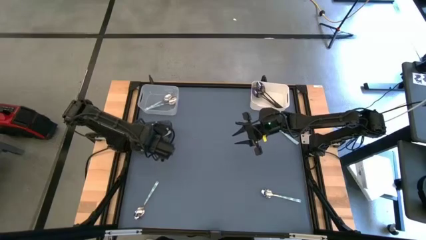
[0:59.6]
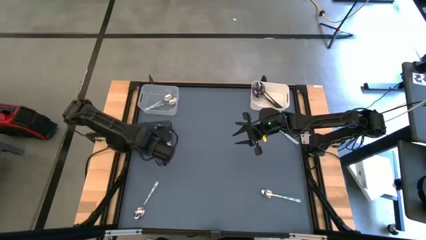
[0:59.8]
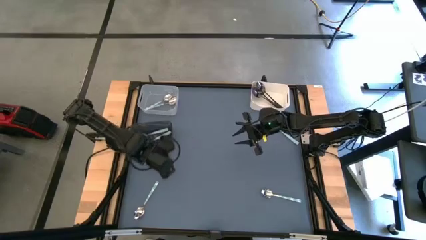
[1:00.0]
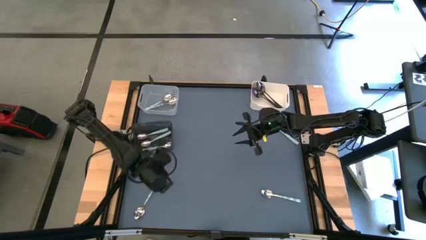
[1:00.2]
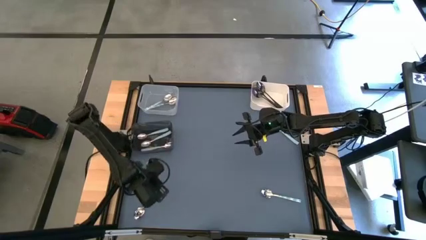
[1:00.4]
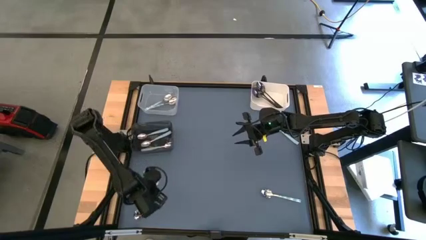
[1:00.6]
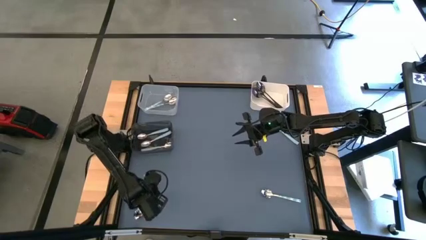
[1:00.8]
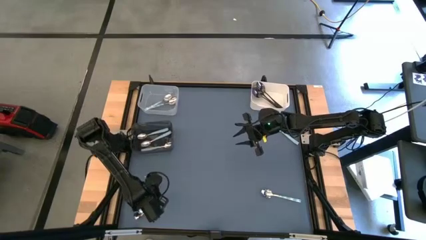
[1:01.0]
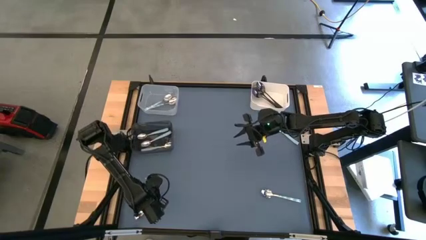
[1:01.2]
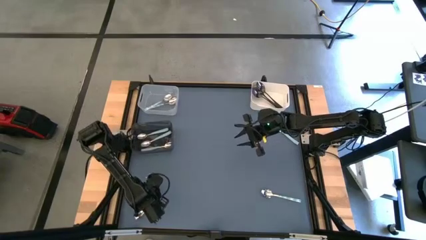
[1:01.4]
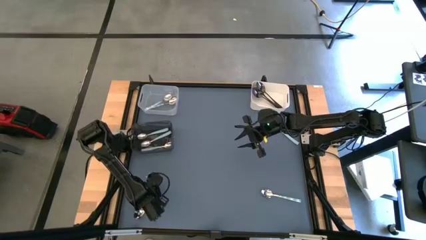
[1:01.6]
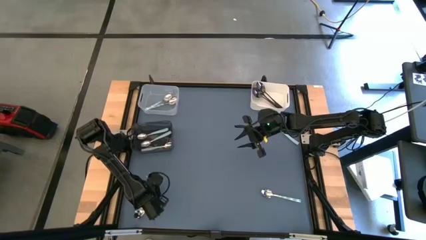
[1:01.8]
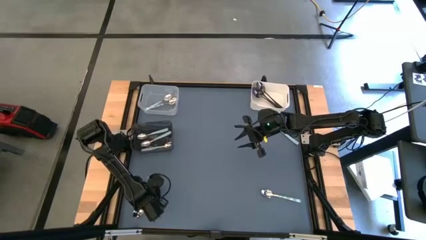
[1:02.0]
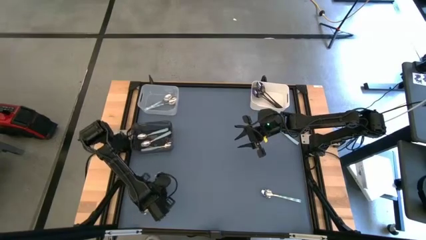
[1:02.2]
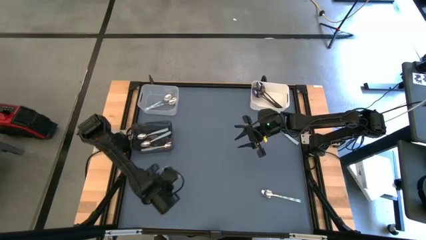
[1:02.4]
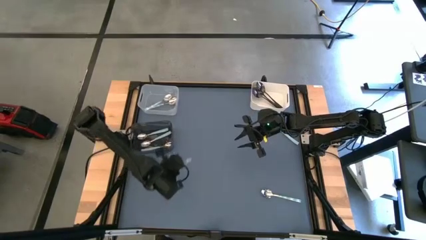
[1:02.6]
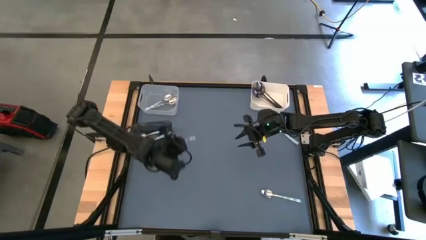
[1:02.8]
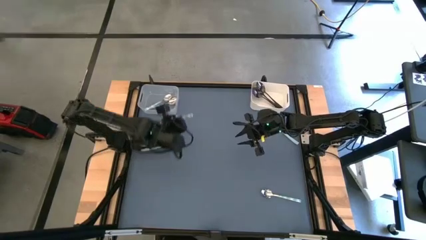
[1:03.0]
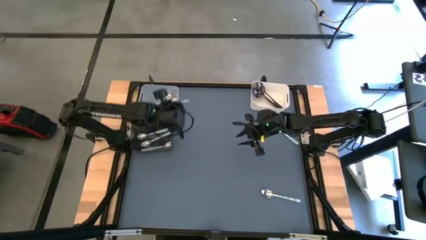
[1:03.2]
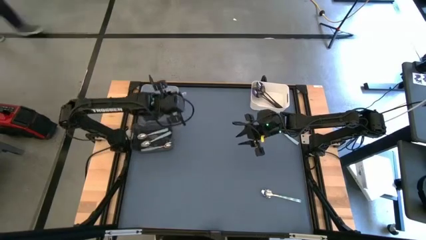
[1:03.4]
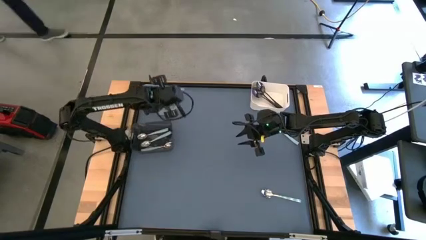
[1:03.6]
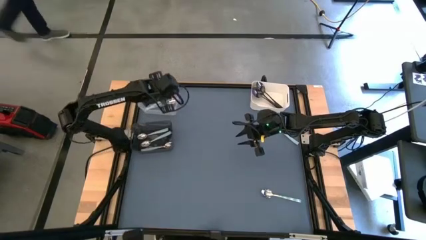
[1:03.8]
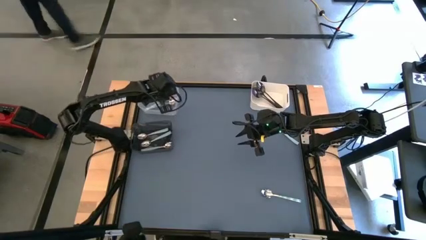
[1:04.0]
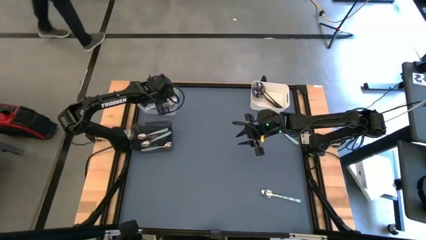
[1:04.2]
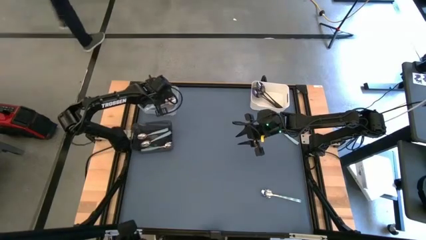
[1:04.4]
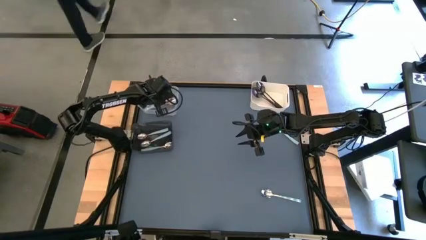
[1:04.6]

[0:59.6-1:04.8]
Task: Sort silverware by color (type)
Put the green spoon into the transparent bin

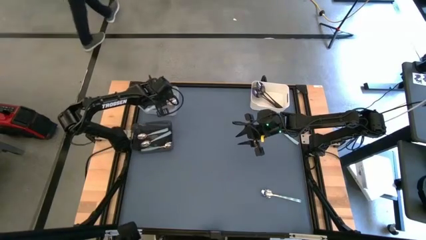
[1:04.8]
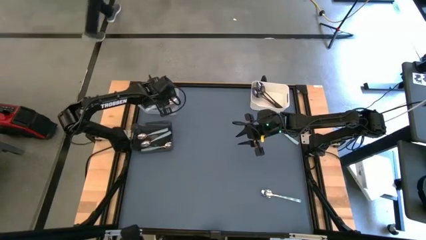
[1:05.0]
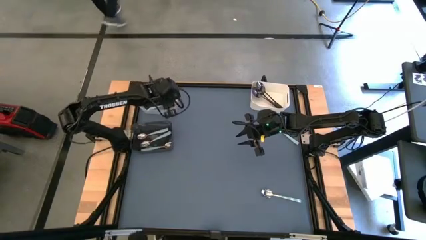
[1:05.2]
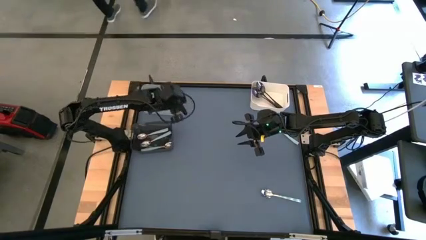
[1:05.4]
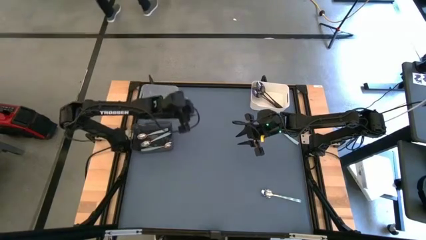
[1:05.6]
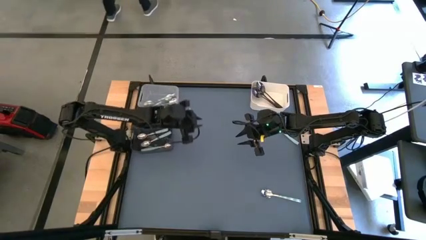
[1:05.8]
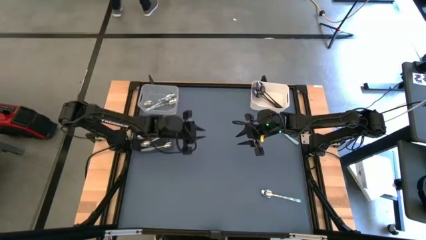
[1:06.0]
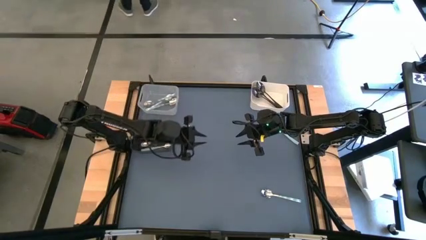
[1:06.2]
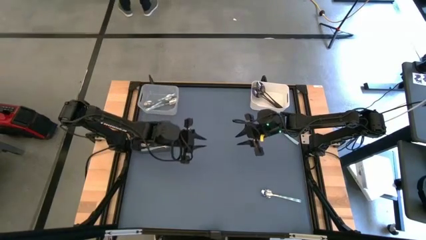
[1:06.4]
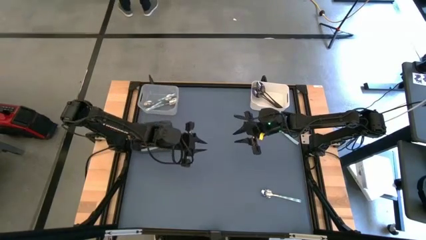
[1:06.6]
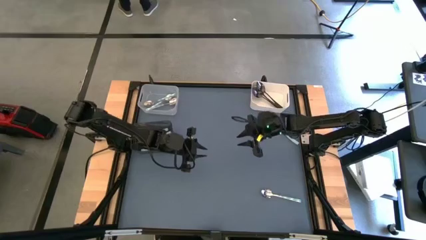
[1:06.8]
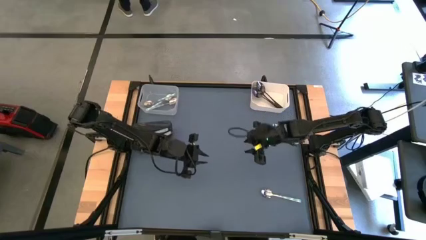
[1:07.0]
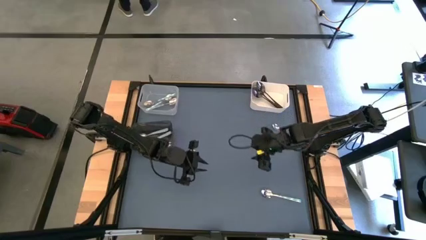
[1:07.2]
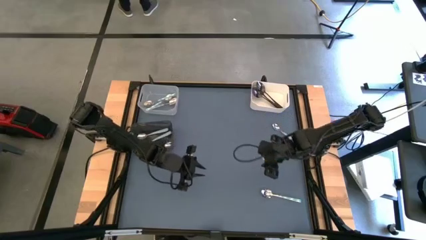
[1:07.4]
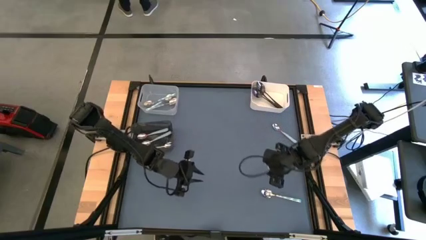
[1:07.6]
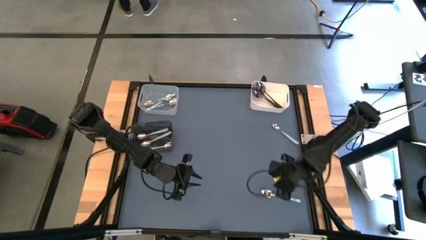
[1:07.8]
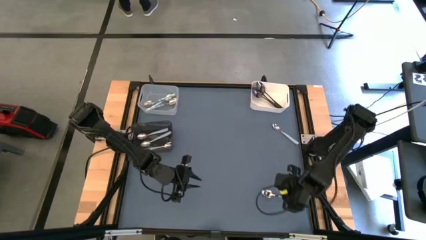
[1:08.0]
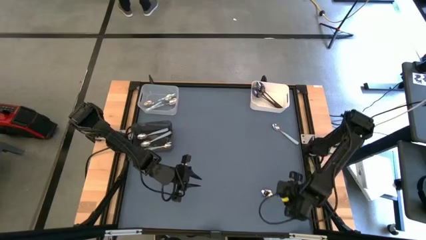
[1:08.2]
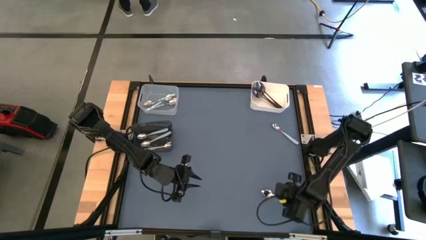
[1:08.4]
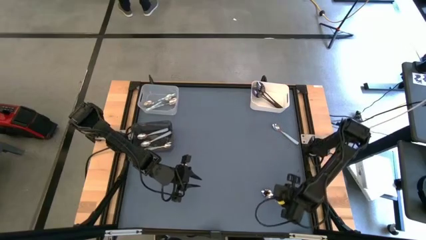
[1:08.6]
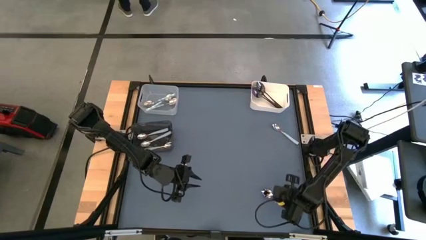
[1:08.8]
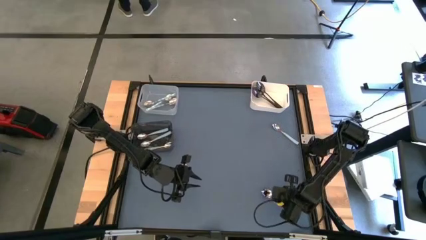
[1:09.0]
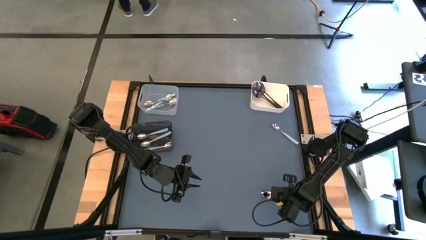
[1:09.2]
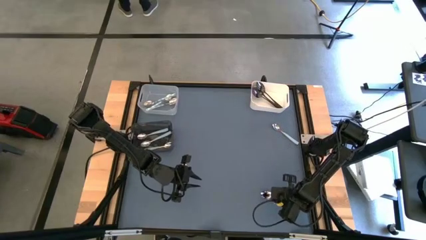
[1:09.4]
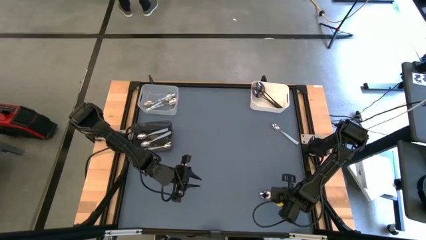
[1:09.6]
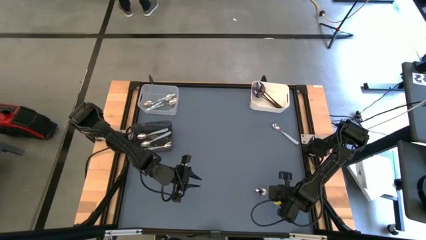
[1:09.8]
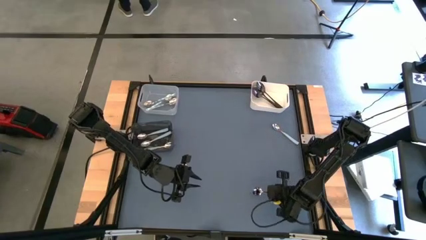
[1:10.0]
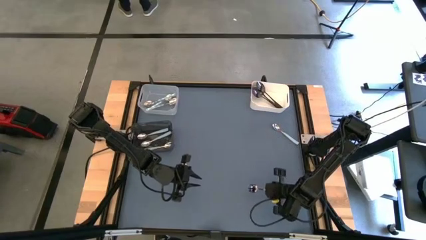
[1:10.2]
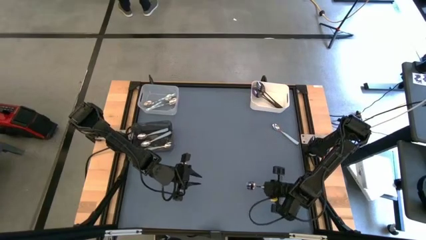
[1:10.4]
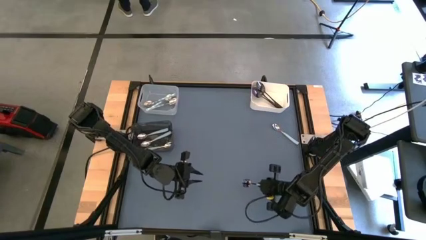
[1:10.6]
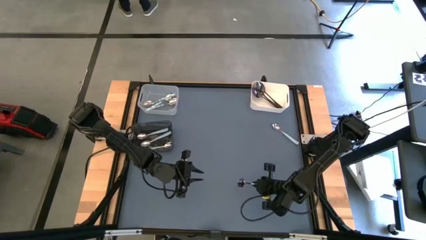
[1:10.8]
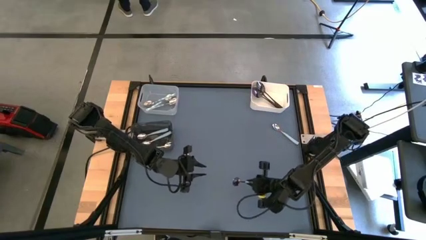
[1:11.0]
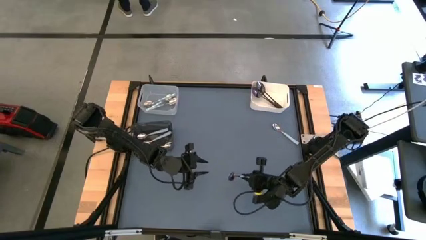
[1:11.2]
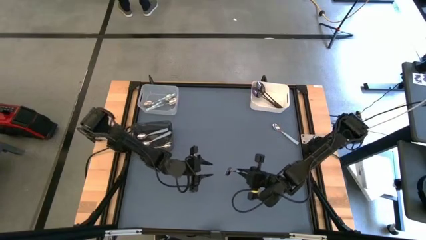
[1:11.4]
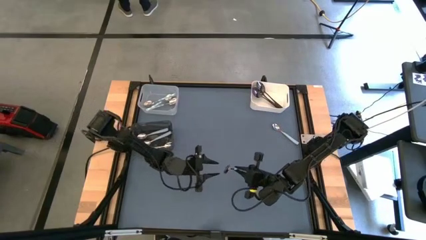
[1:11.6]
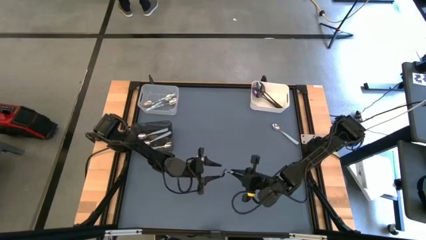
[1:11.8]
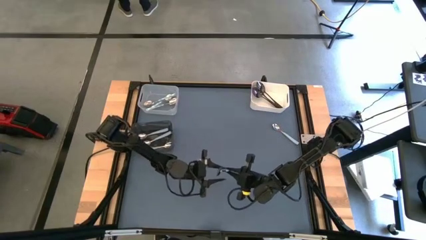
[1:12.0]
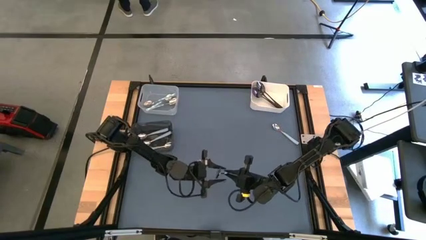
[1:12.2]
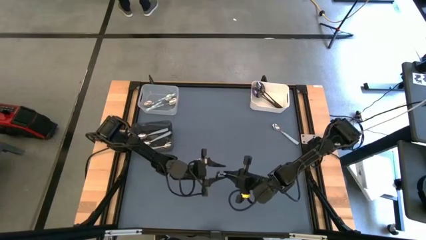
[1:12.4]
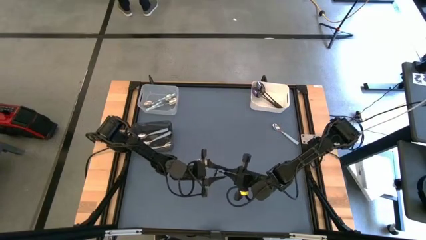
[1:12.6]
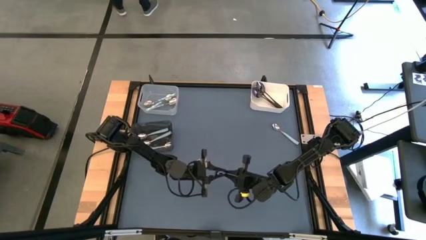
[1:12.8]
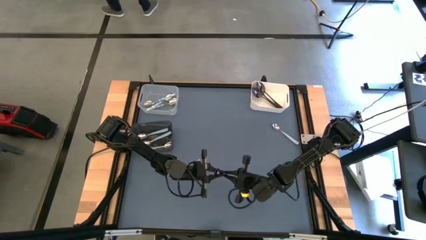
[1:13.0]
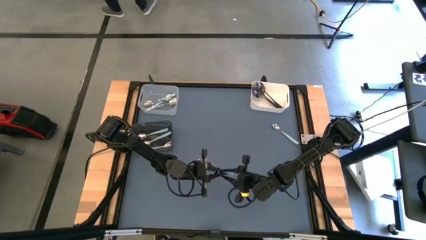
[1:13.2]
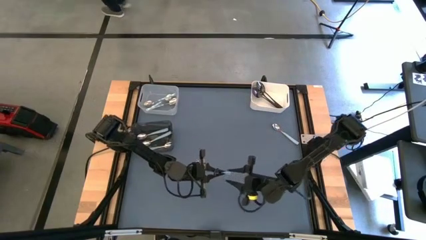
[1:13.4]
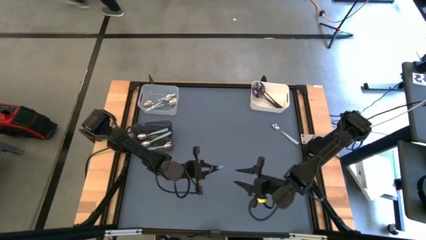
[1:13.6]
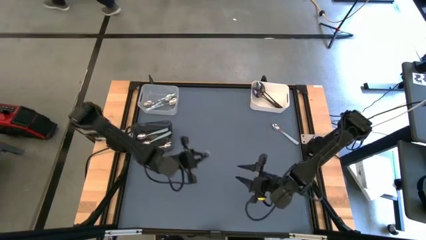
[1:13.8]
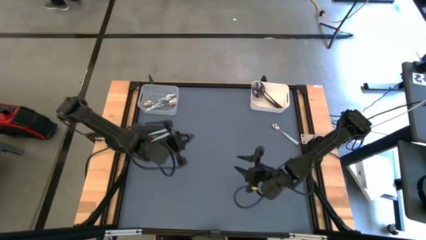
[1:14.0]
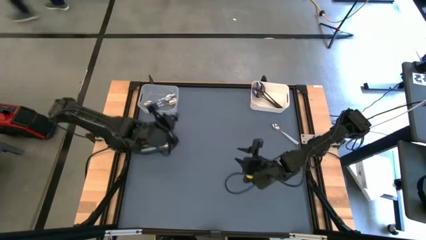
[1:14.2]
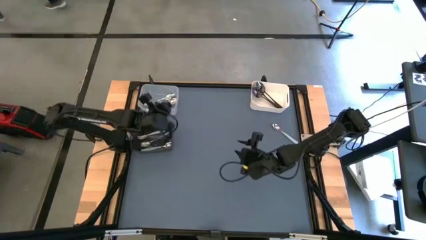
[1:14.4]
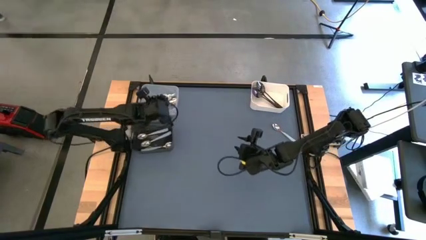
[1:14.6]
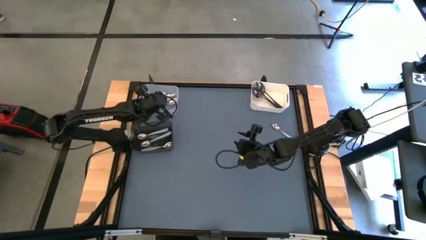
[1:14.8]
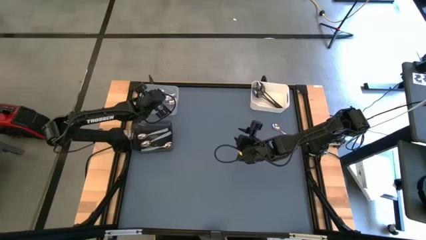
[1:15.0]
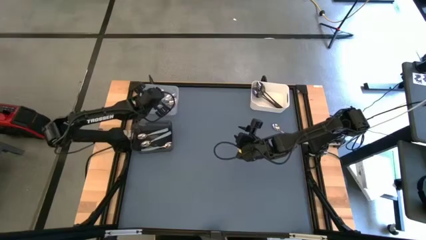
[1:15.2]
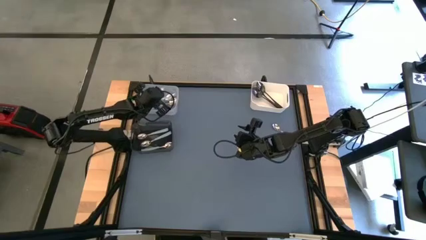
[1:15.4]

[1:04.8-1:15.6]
Put the green spoon into the transparent bin

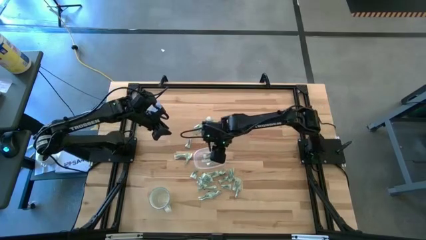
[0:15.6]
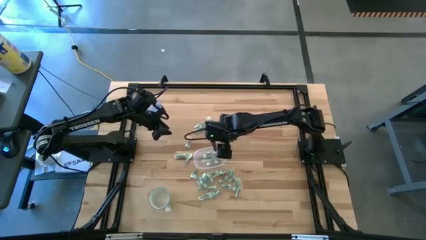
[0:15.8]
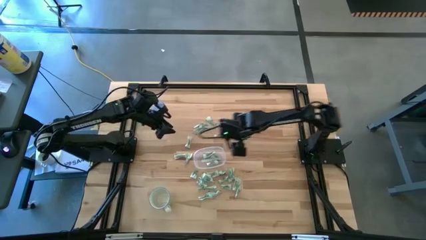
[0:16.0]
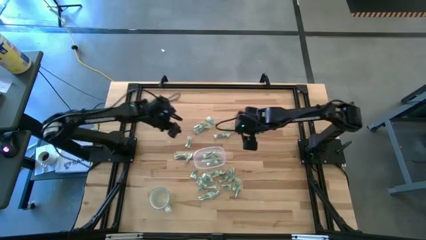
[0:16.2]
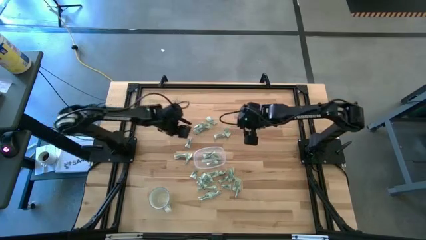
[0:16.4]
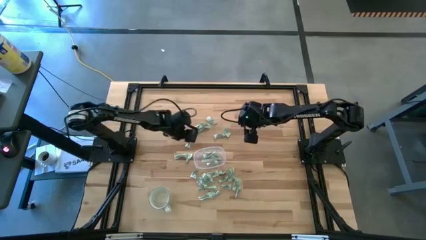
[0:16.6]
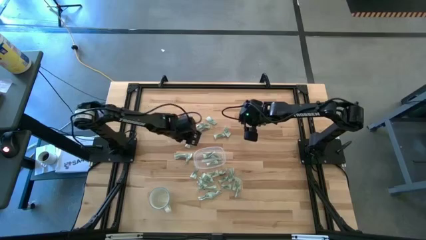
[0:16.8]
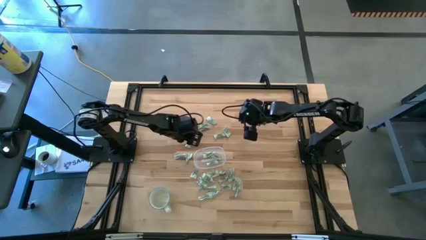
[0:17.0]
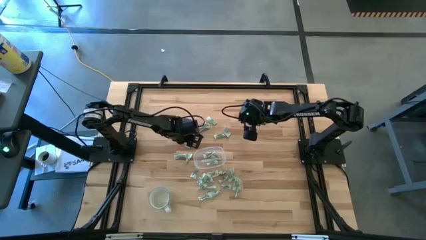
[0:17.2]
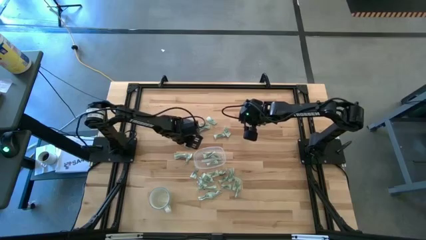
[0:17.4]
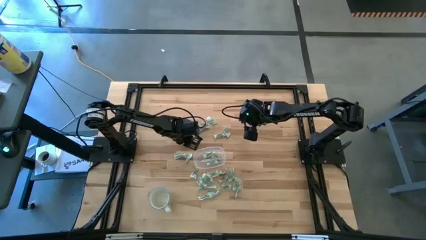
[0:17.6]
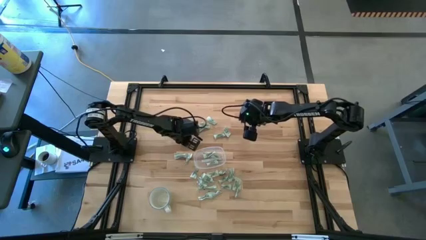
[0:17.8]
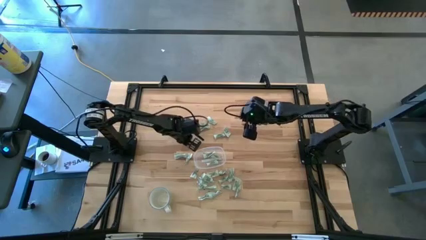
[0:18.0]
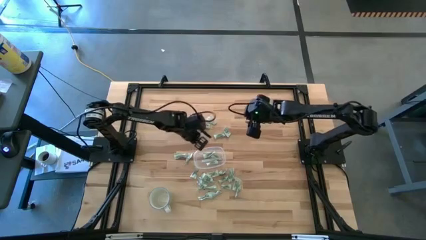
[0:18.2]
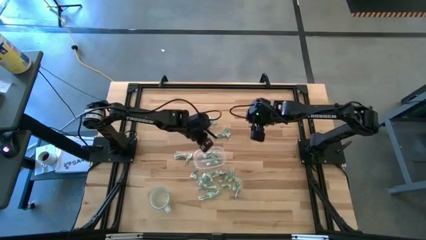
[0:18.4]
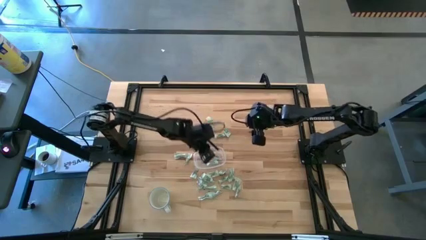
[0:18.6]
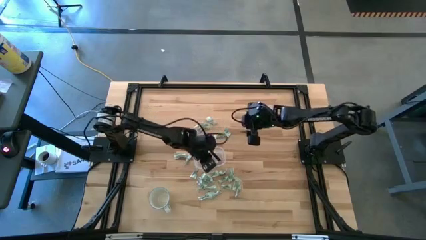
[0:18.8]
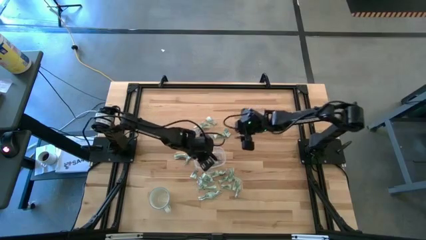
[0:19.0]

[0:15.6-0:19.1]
Task: Pick and place Stevia / Truvia into bins
Put the stevia packet into the transparent container
